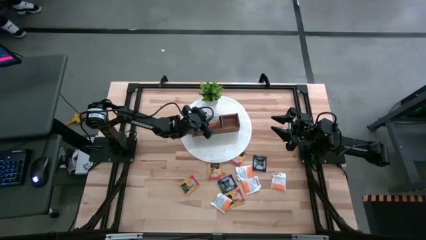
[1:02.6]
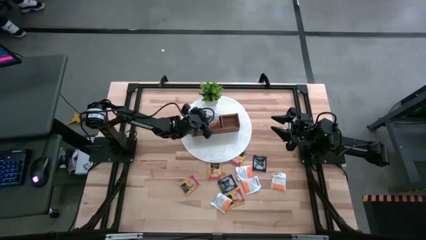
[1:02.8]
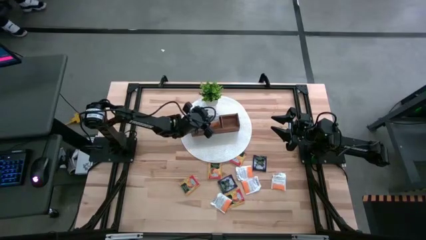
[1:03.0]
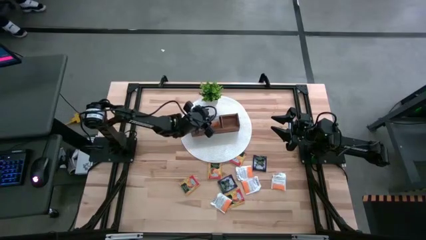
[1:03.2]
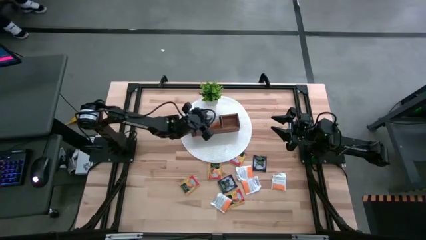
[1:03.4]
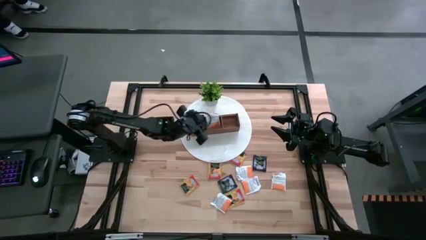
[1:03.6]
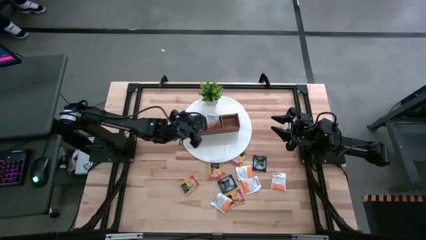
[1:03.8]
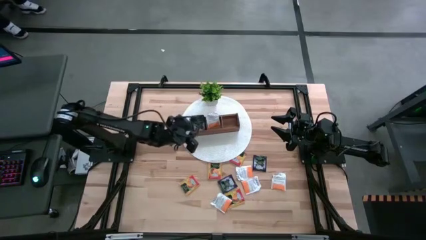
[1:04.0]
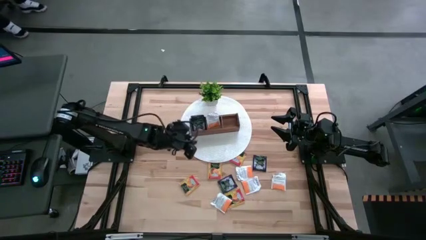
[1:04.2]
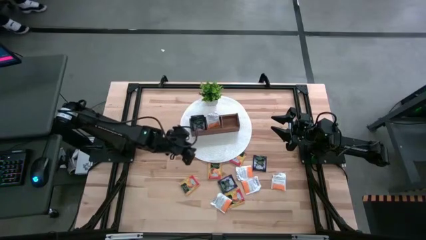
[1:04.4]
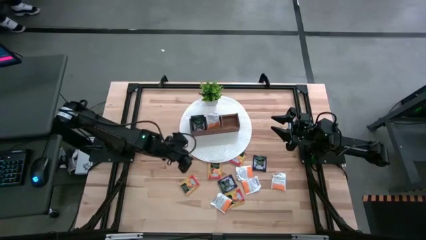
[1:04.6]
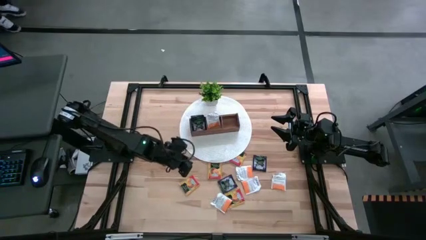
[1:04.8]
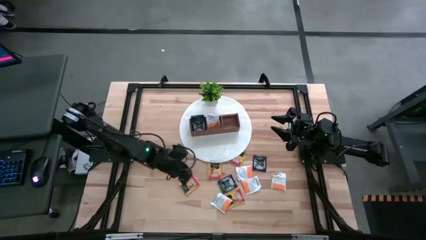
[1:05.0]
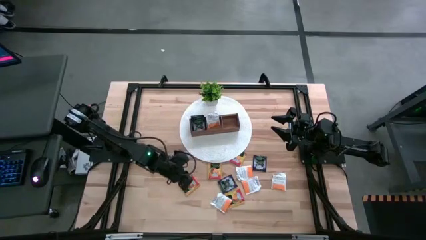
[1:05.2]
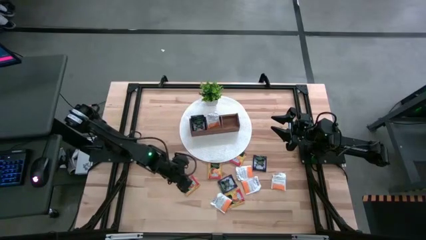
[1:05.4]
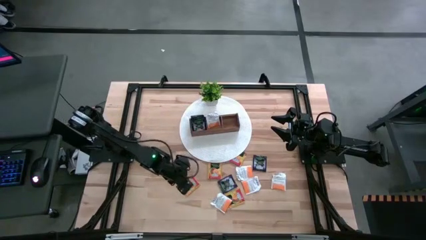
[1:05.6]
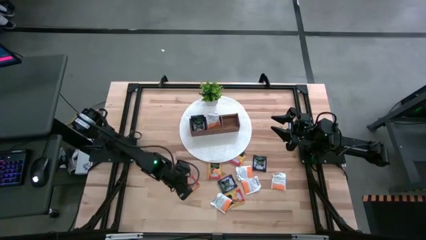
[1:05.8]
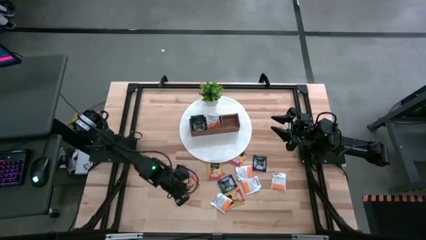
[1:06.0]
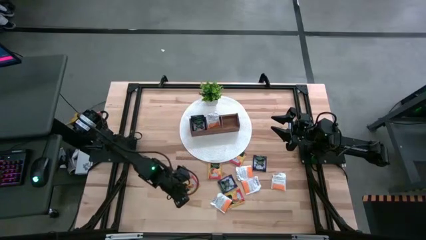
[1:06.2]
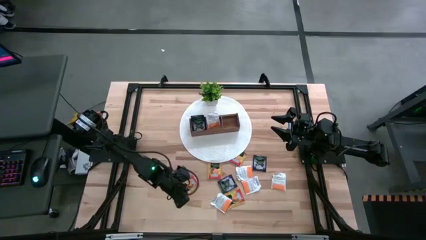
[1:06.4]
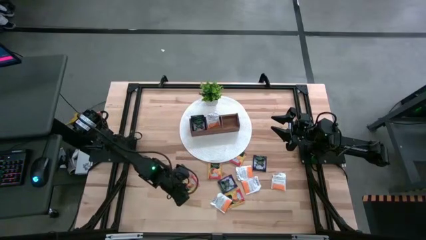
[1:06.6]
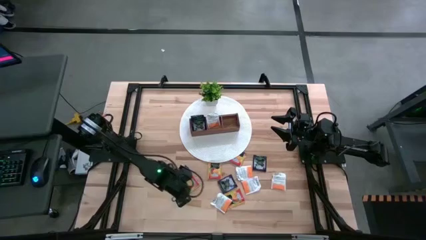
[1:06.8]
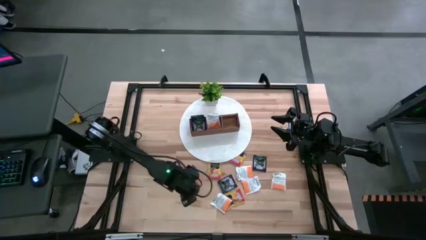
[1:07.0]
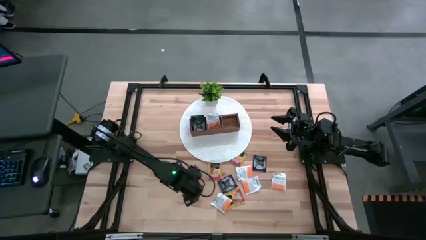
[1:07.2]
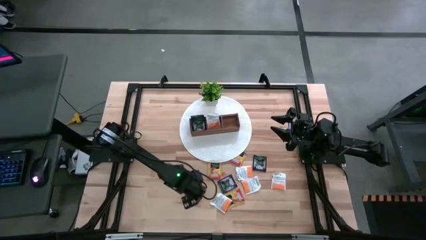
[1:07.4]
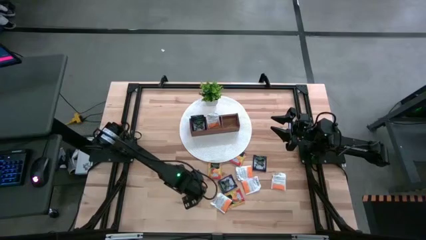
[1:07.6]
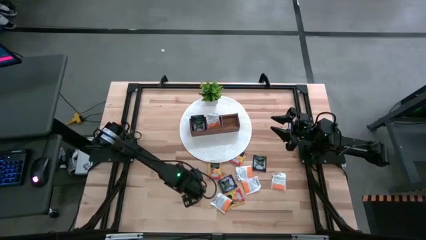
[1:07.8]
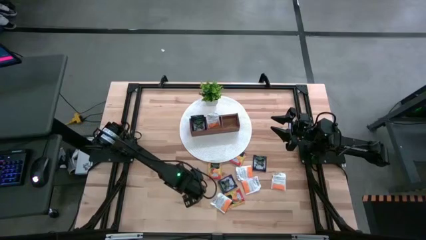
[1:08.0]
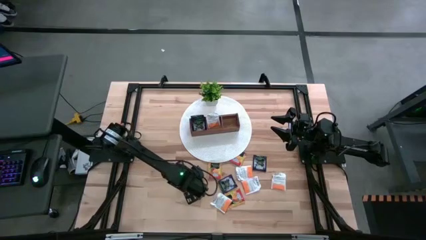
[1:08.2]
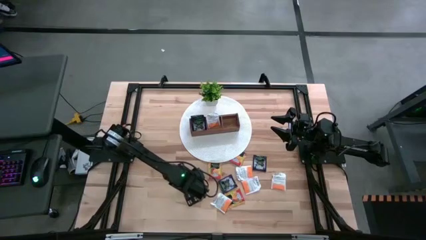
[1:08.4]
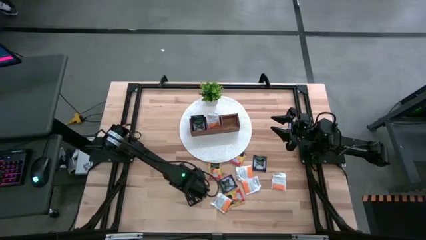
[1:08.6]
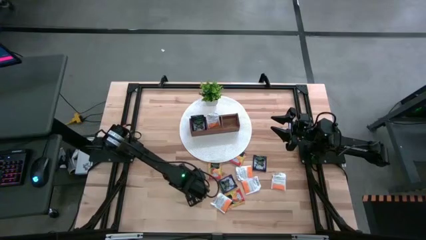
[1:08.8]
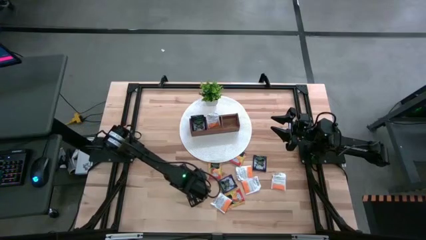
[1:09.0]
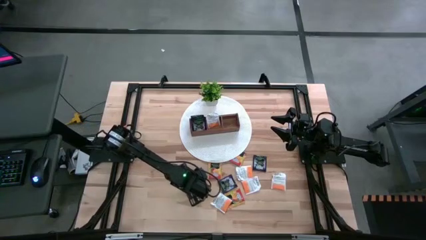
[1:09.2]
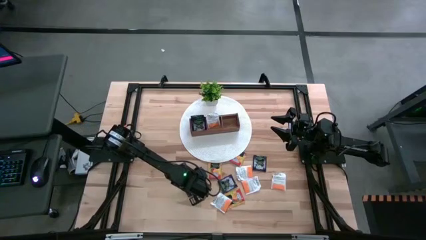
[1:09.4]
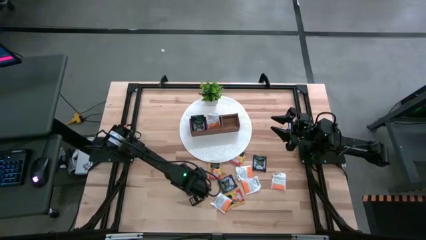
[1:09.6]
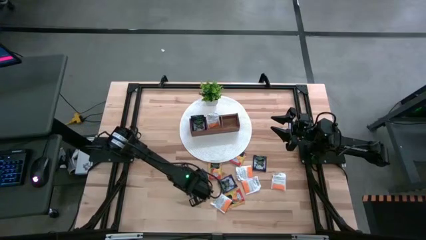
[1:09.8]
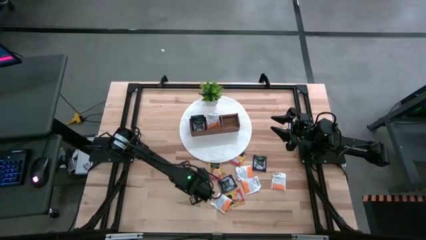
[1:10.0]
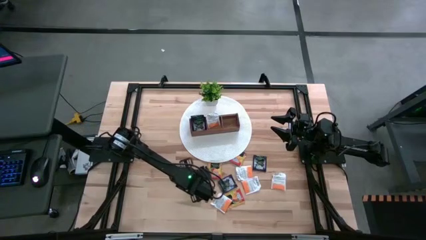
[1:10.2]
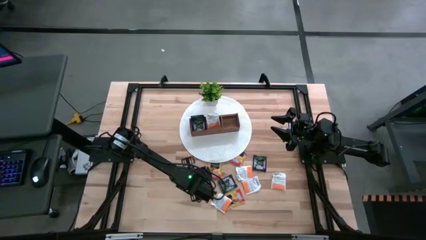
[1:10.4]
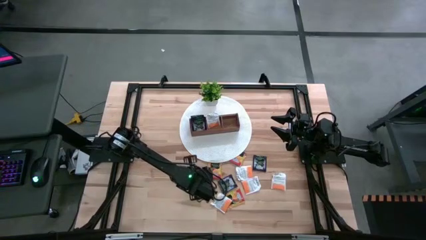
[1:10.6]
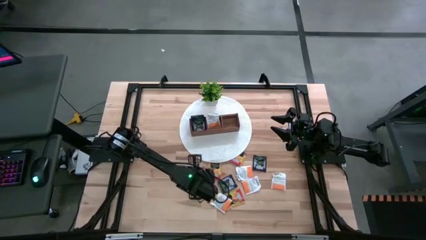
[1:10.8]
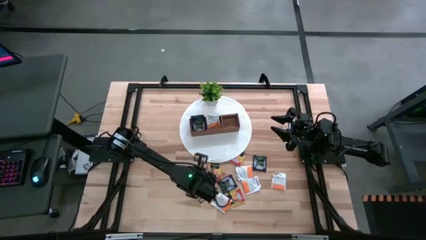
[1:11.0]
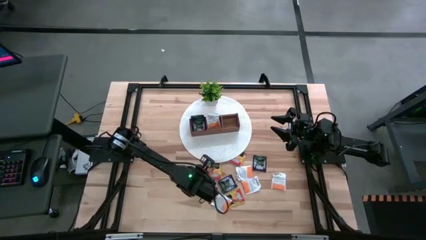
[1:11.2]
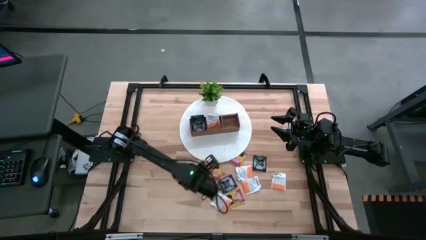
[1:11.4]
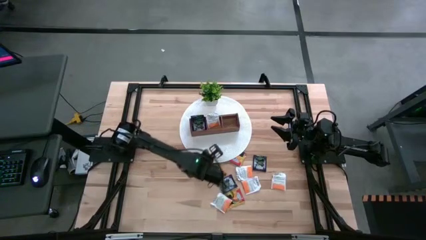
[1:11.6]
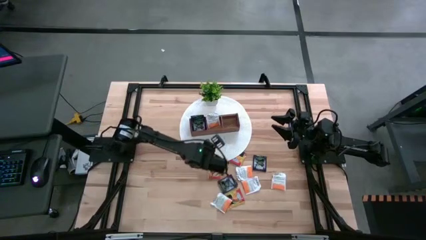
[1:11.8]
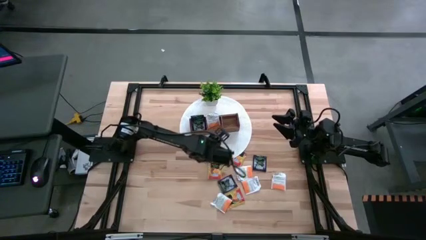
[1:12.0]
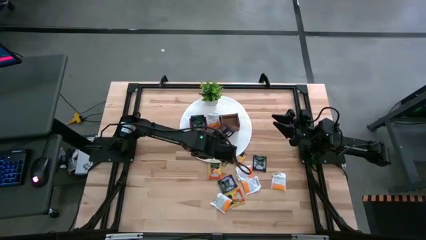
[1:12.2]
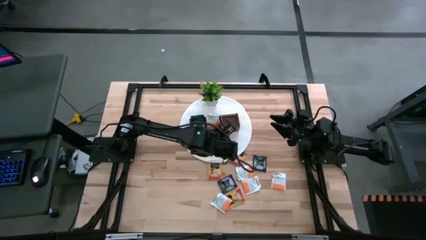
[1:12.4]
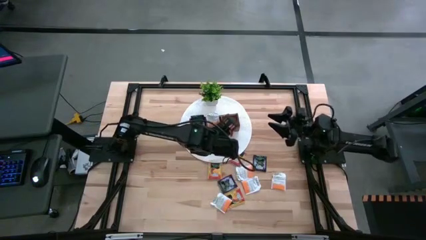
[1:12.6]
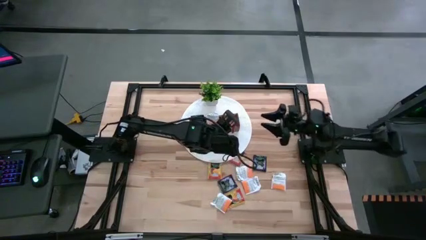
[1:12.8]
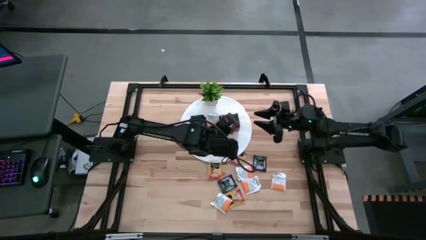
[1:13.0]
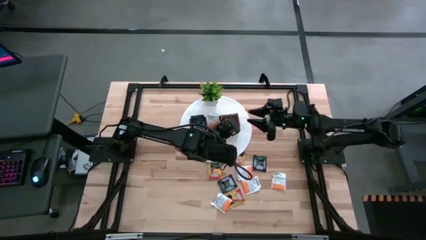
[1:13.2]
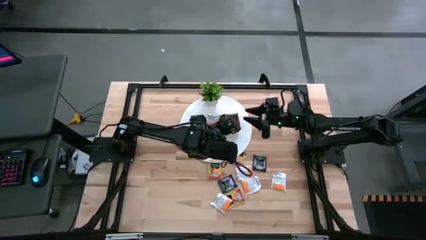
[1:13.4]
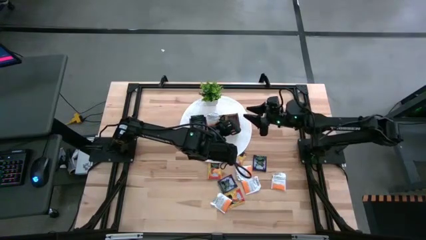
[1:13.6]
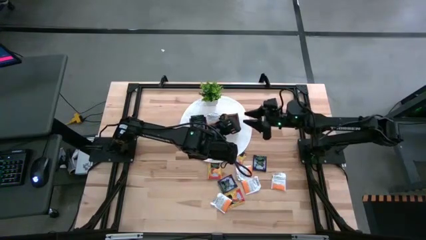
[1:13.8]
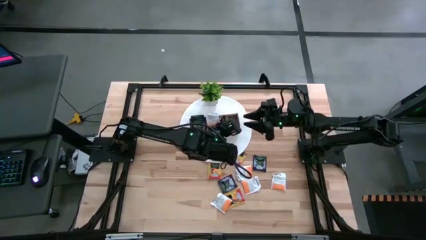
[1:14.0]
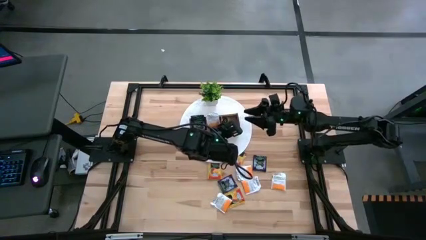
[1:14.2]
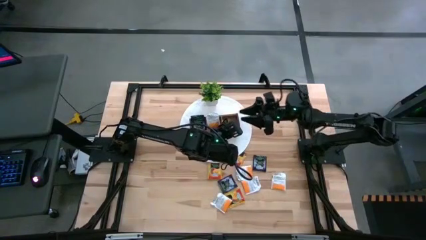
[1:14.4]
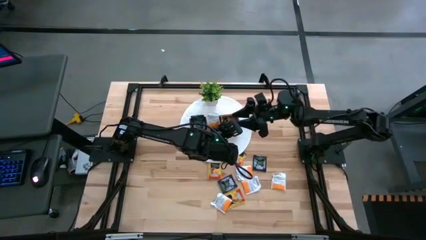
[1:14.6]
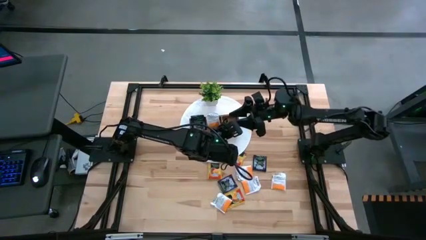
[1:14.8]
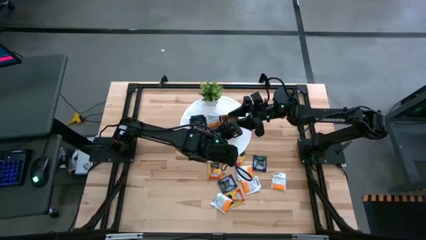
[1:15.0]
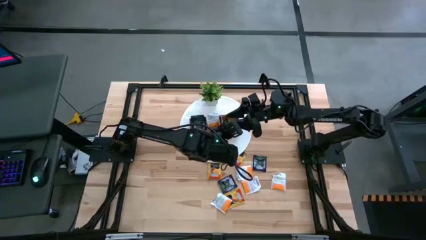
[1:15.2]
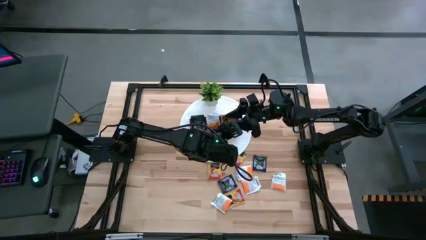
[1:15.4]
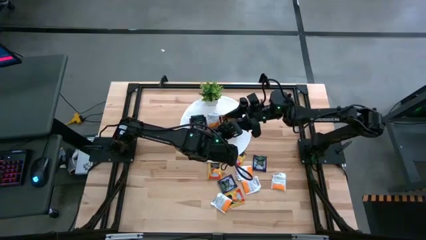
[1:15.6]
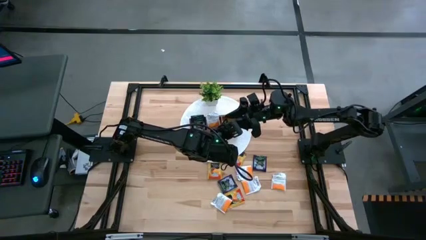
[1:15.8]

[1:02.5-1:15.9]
Task: Pick & Place Tea
Put the orange tea bag into the right section of the wooden organizer

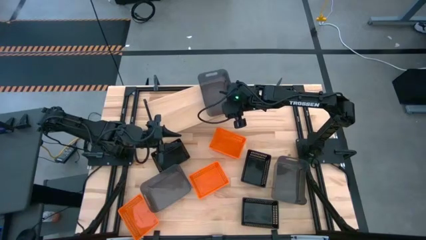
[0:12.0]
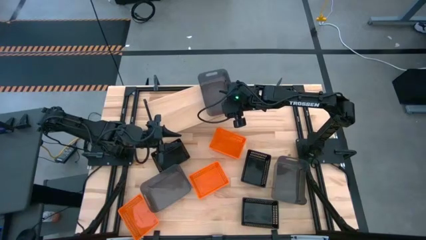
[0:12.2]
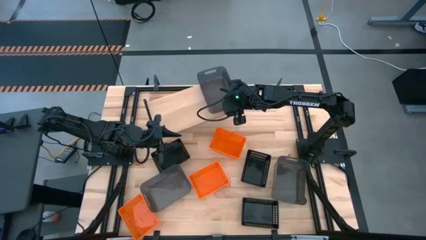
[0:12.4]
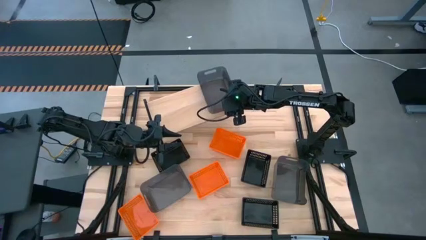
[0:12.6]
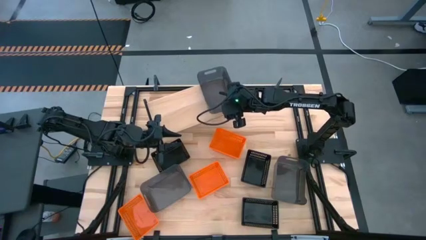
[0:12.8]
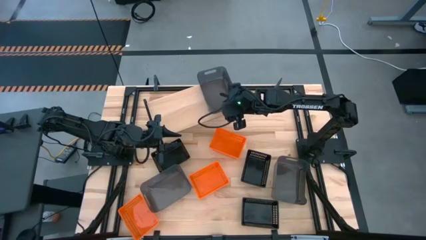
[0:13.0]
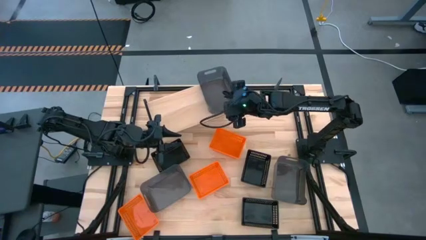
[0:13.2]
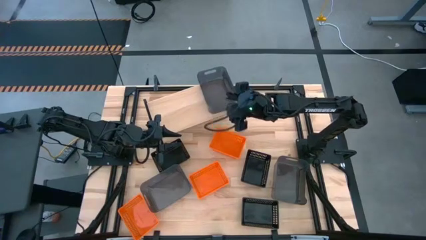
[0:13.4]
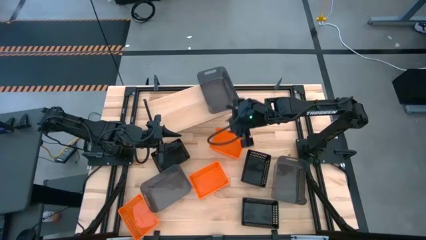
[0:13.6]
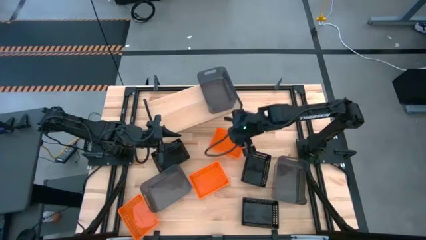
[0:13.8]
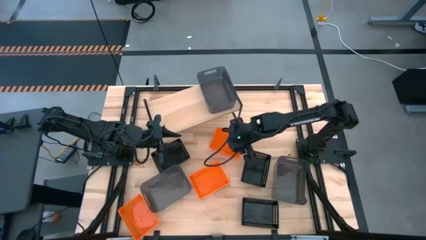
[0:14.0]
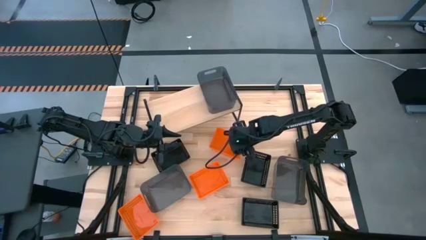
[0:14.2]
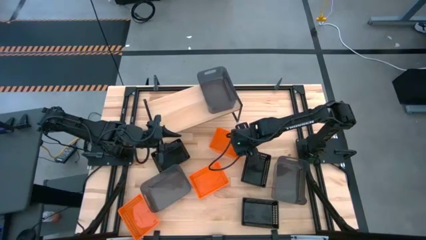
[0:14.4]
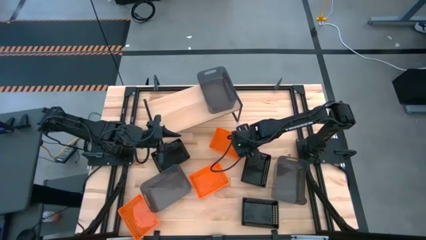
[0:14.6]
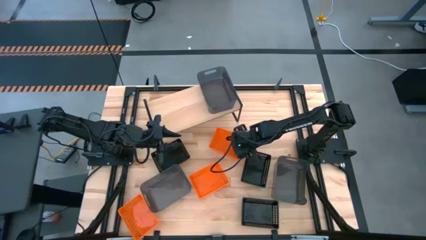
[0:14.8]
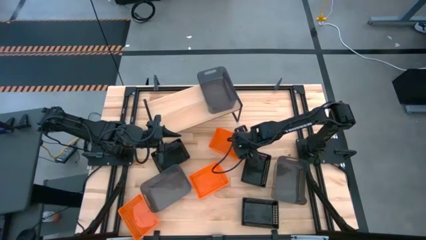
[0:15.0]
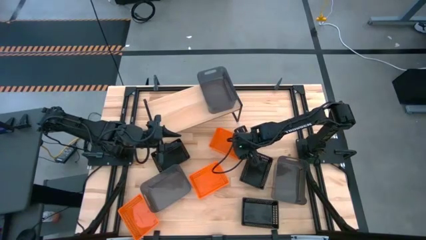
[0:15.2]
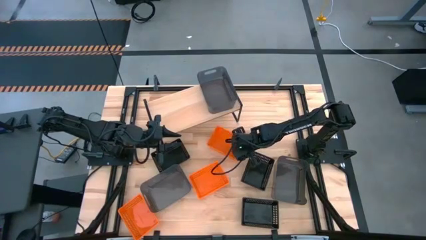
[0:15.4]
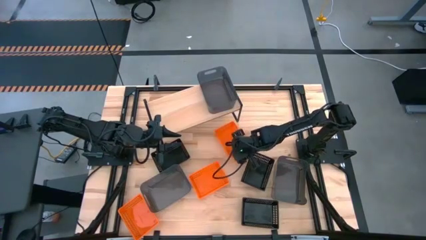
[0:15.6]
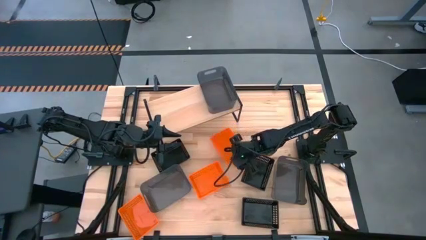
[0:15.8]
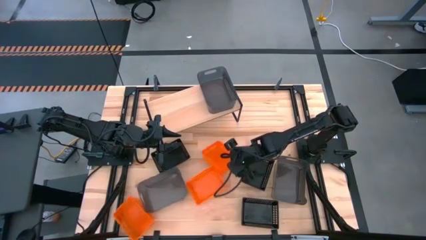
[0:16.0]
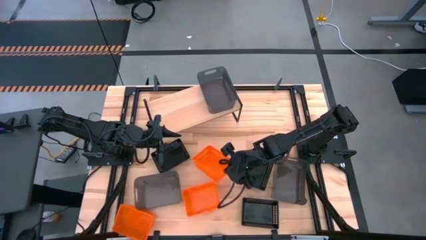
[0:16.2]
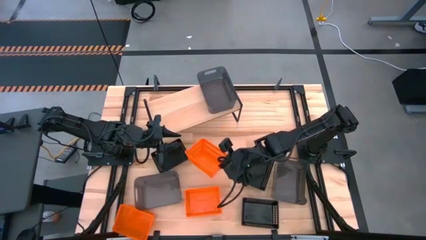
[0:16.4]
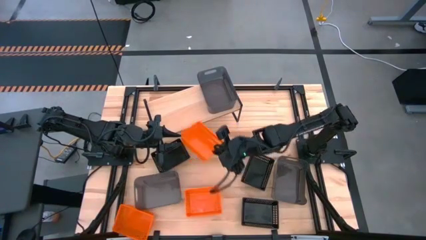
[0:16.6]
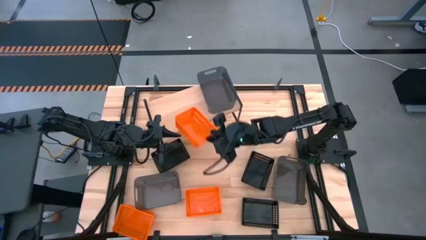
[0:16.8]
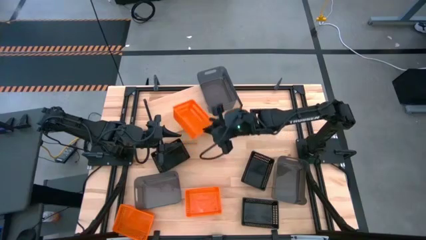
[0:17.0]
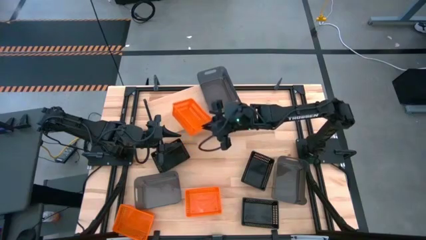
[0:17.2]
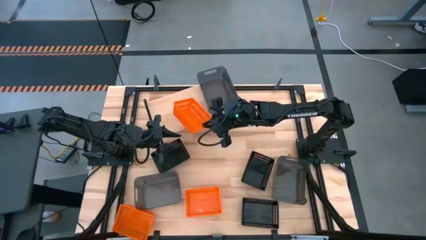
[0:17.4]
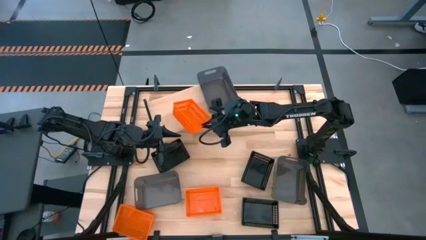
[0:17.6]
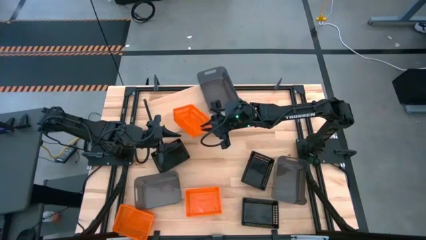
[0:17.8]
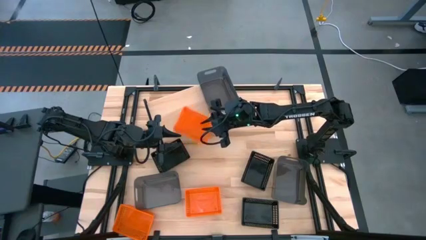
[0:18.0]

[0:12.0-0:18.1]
Task: Stack baskets on shelf by color
Put the top right orange bin on the shelf
